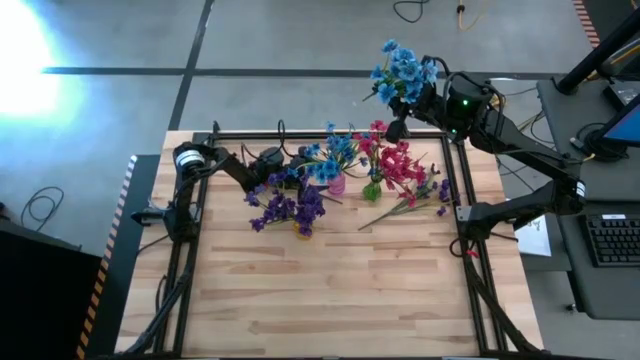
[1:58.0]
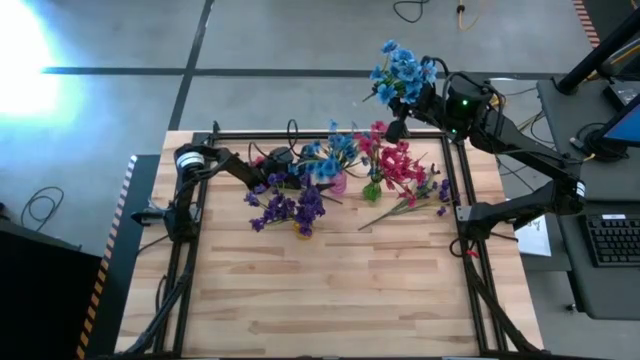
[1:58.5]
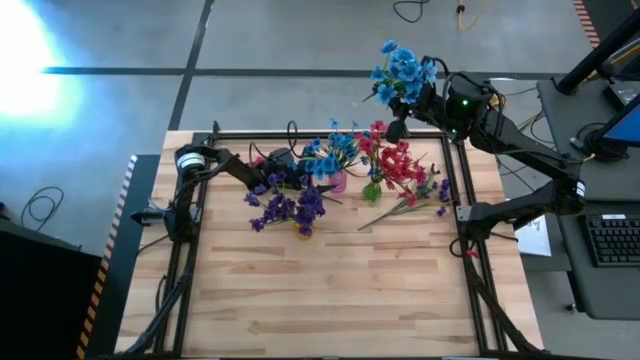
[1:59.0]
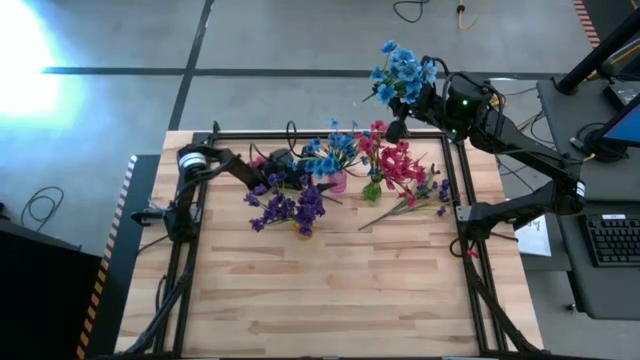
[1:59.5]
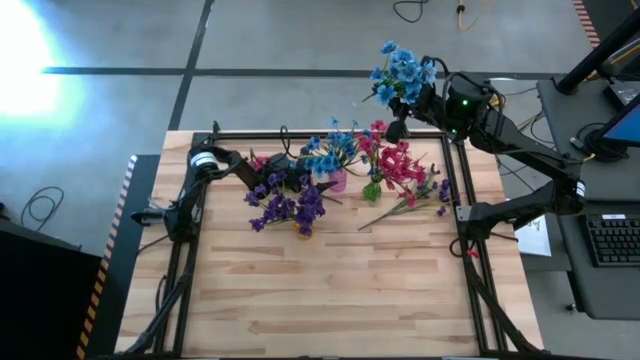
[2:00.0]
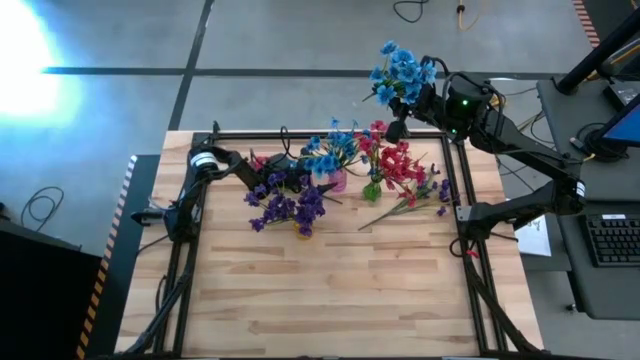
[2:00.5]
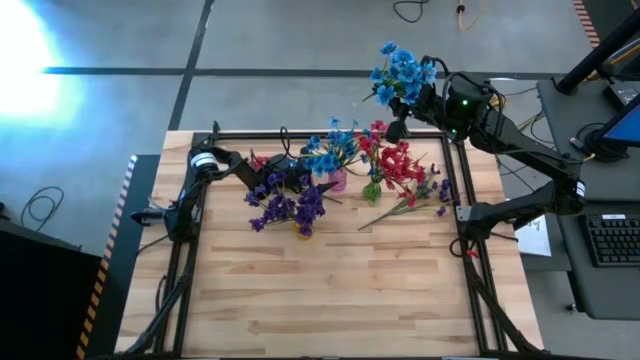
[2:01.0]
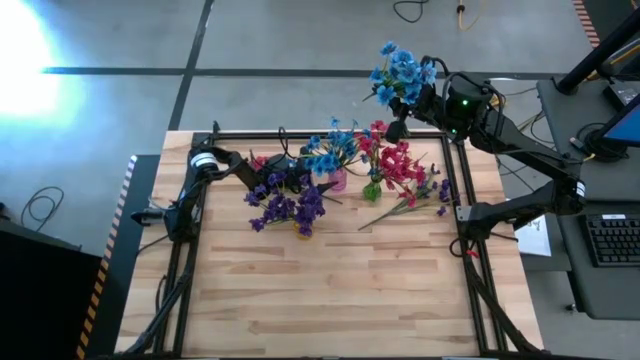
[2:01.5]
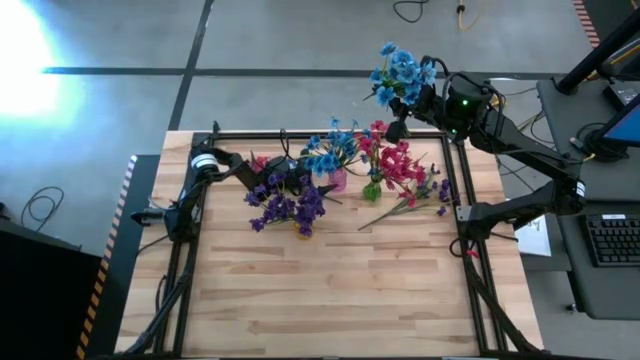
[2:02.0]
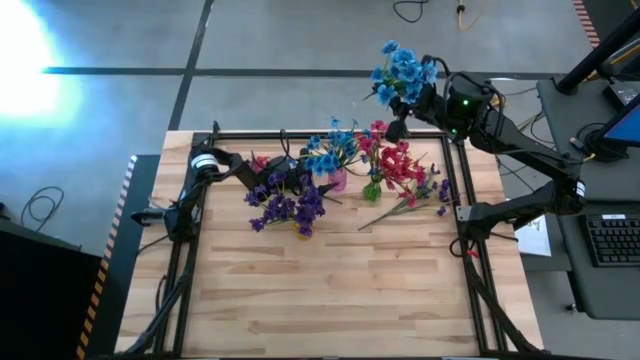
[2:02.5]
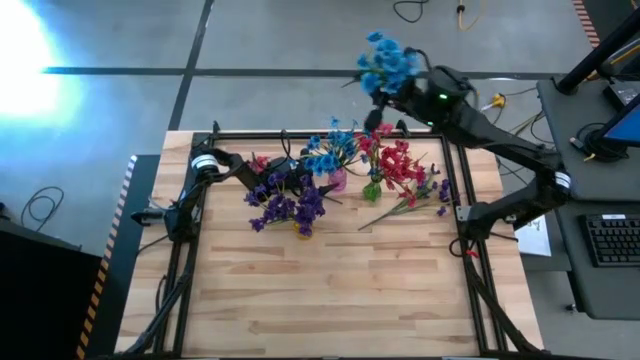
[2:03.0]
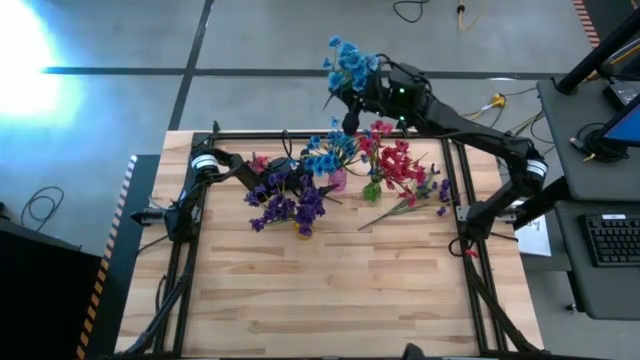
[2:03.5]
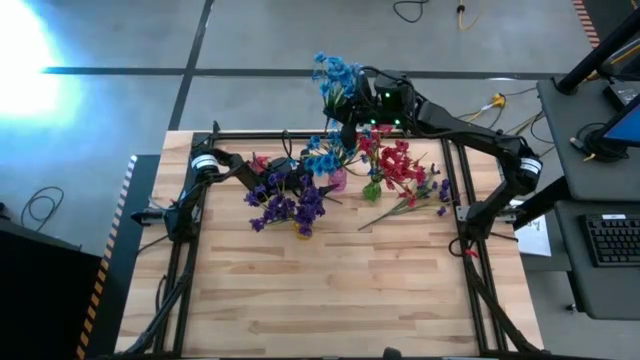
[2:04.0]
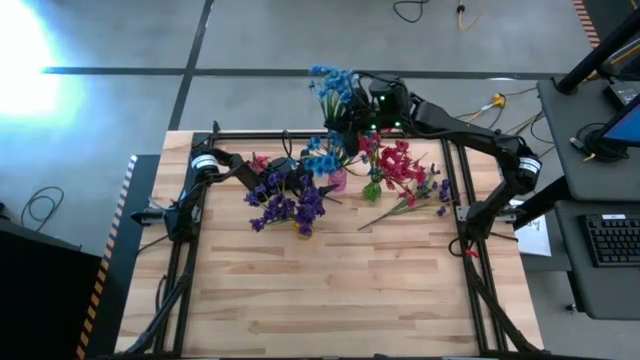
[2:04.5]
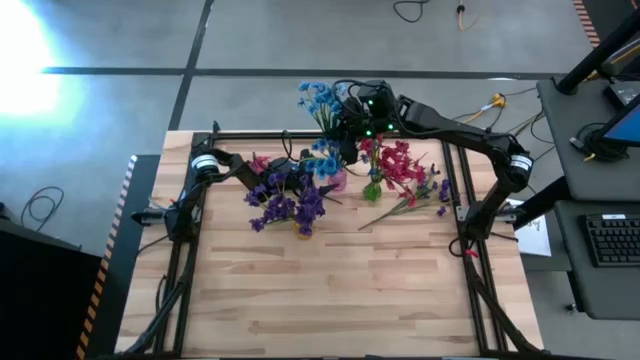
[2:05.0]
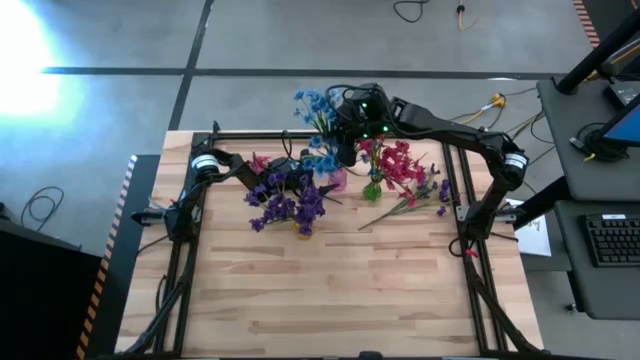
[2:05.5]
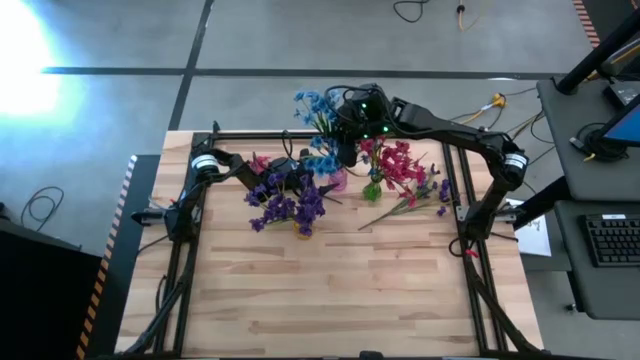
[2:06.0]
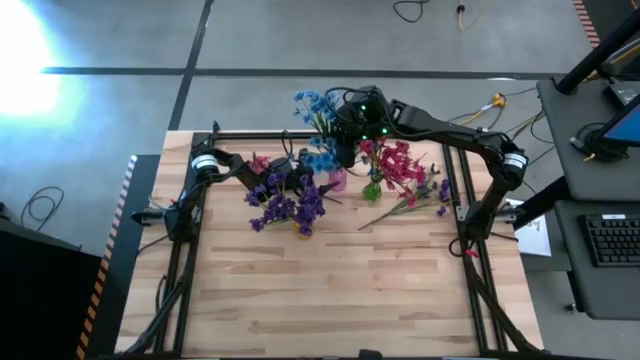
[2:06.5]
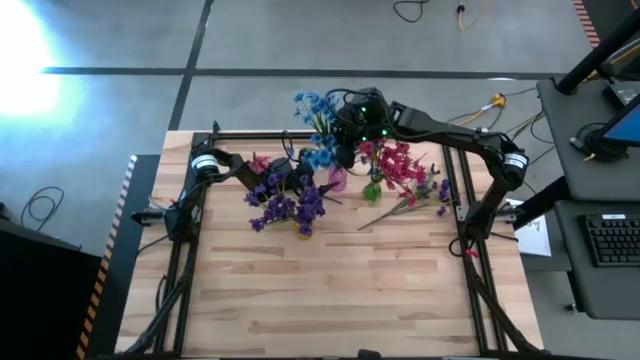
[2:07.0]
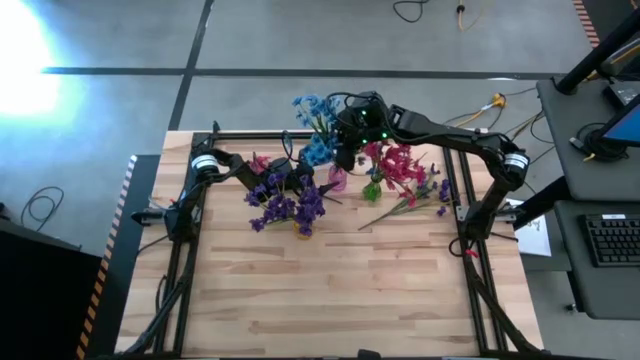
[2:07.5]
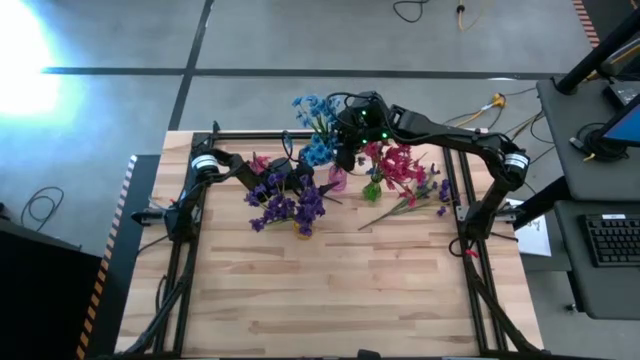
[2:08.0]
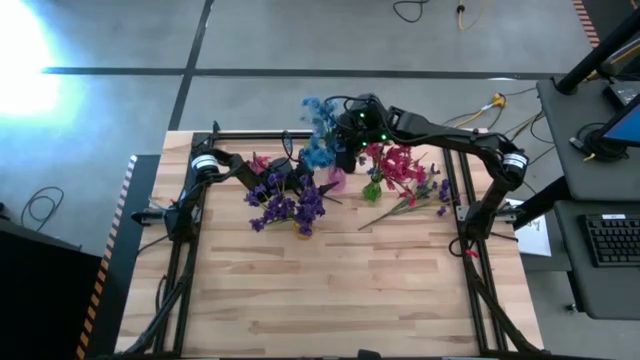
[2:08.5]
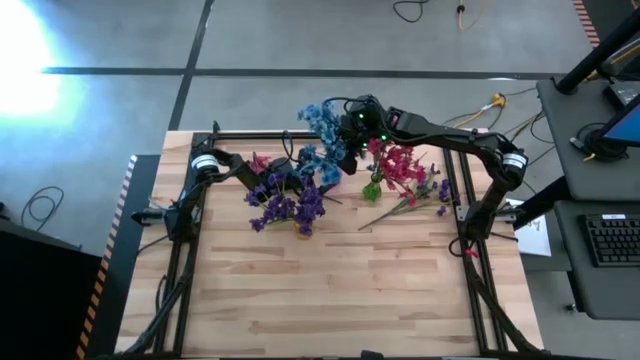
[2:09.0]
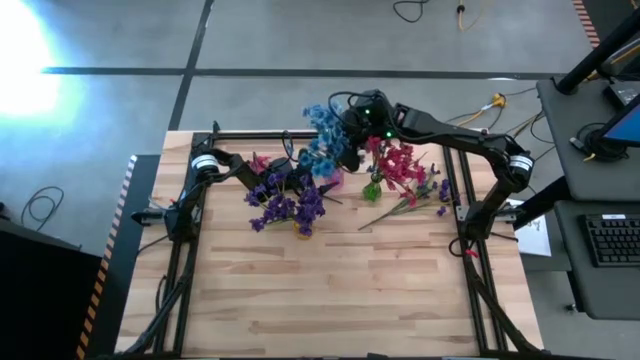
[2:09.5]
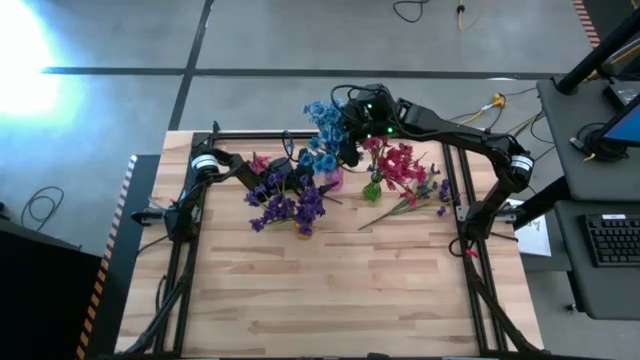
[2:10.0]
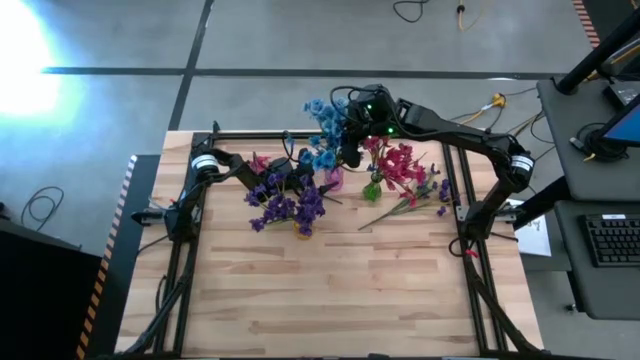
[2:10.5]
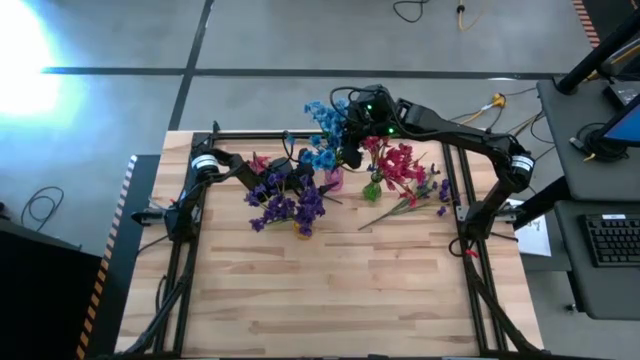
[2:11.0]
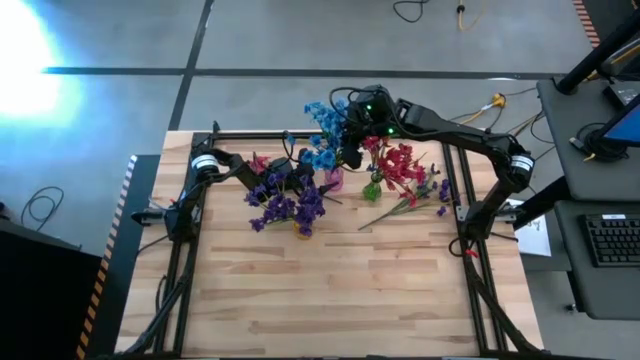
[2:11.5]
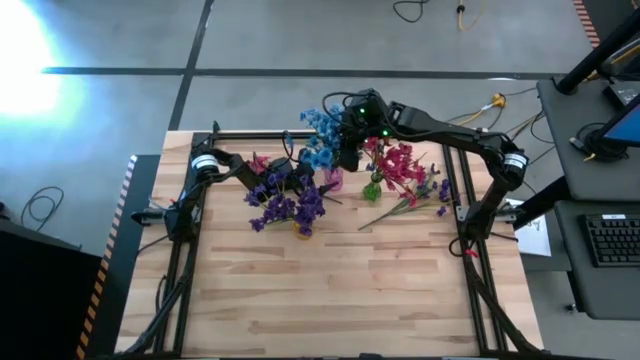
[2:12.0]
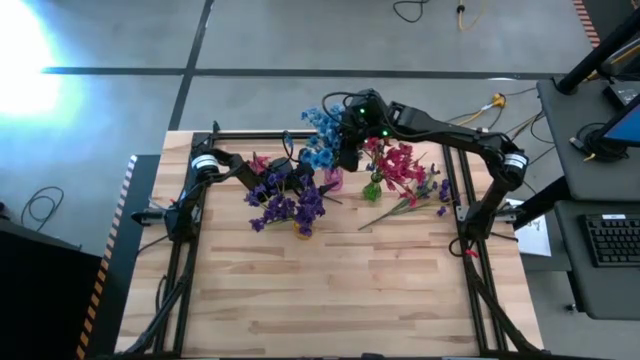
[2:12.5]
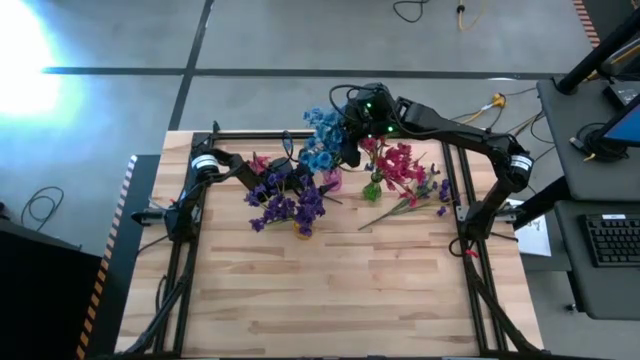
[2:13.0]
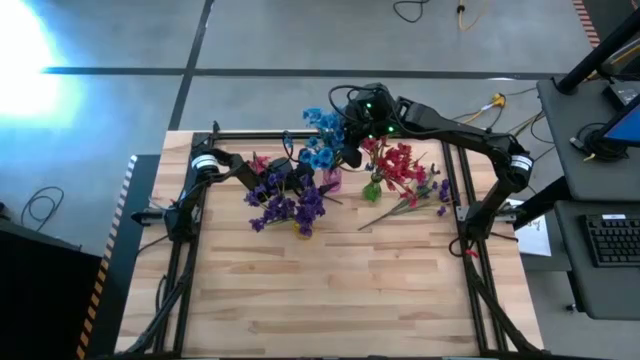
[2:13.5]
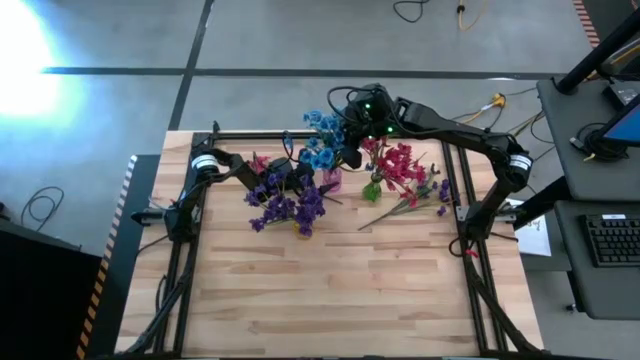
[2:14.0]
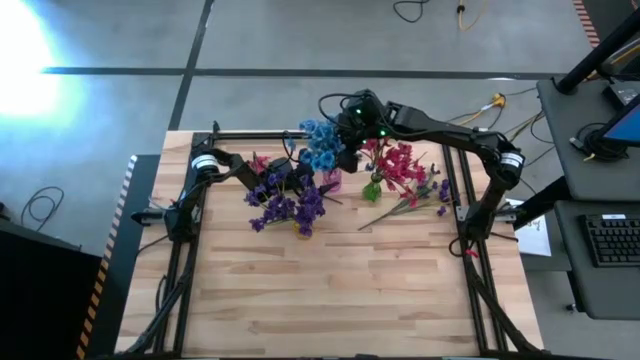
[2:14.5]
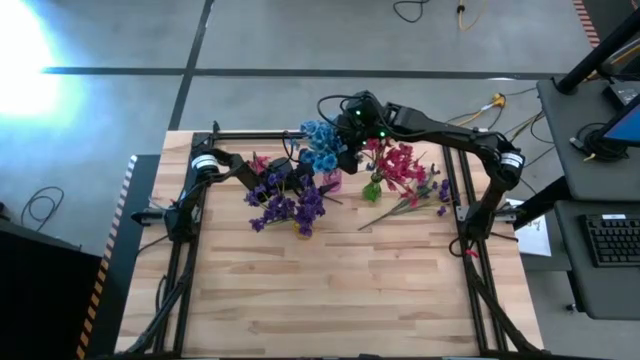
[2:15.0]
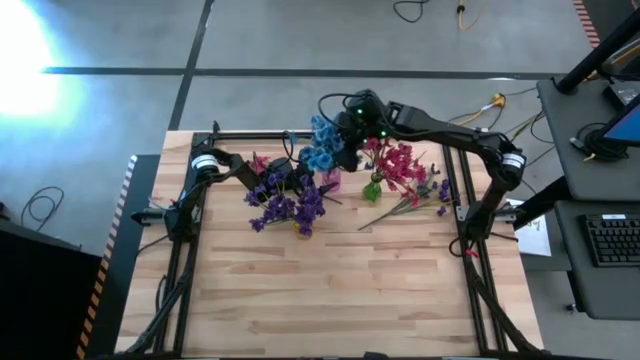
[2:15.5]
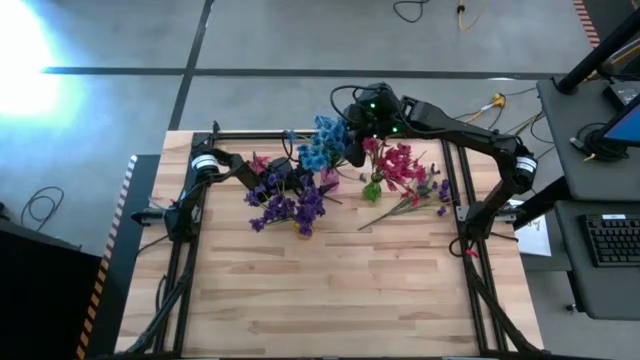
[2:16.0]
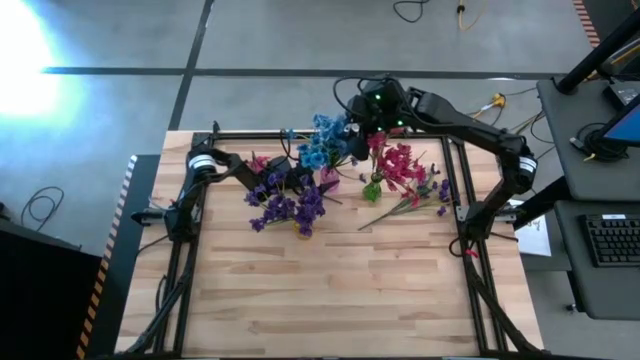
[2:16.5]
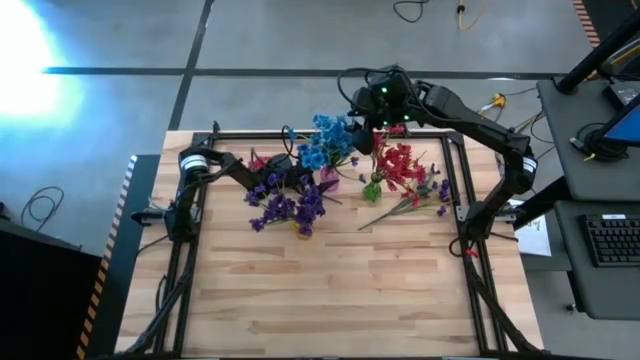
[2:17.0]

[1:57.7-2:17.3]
Task: Sort flowers into vase by color
Put the blue flowers into the pink vase
